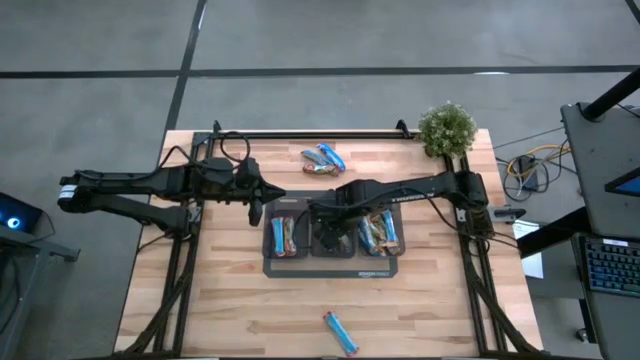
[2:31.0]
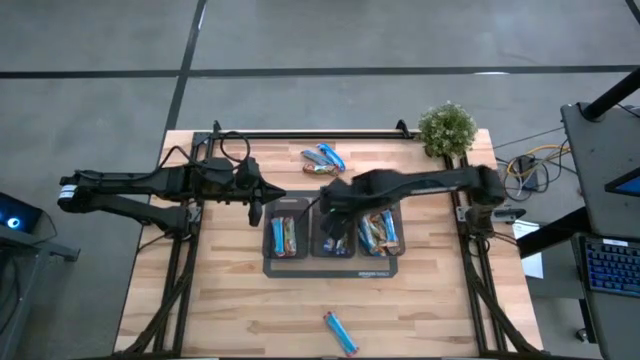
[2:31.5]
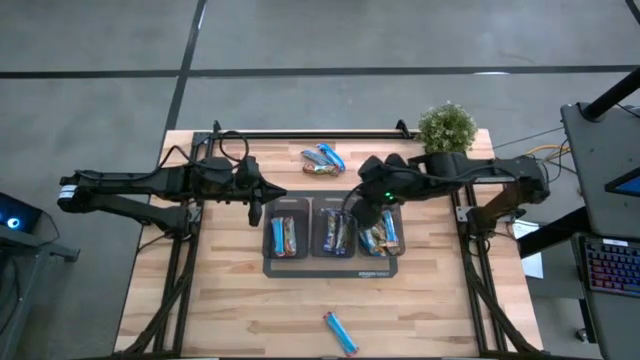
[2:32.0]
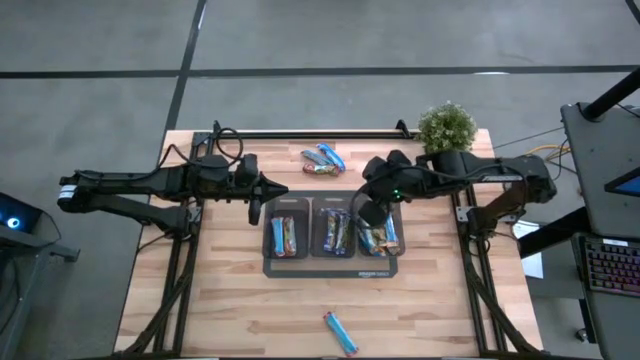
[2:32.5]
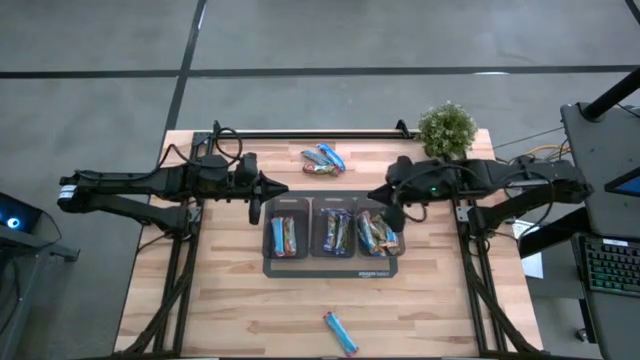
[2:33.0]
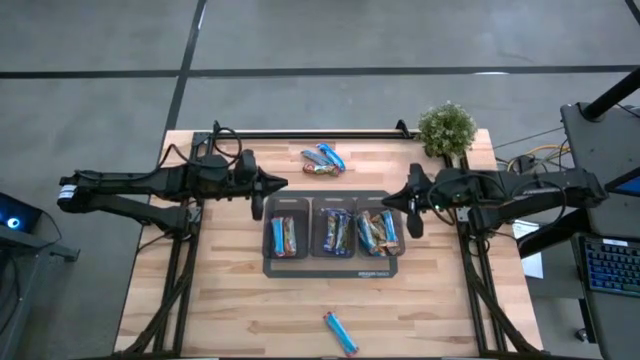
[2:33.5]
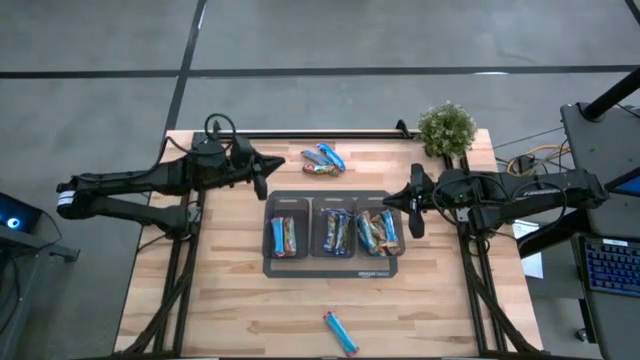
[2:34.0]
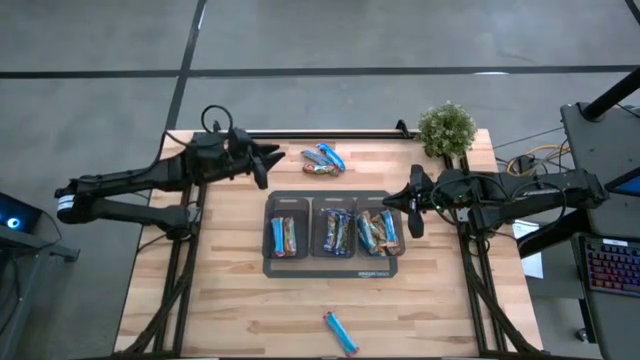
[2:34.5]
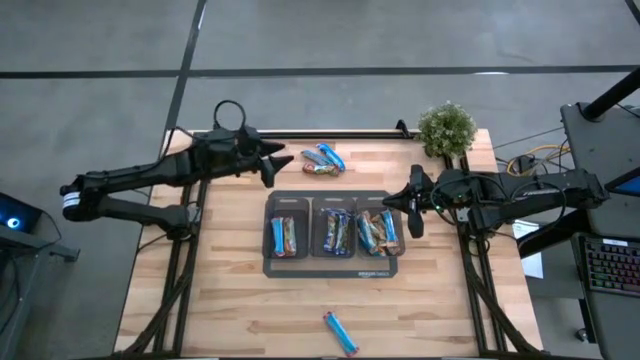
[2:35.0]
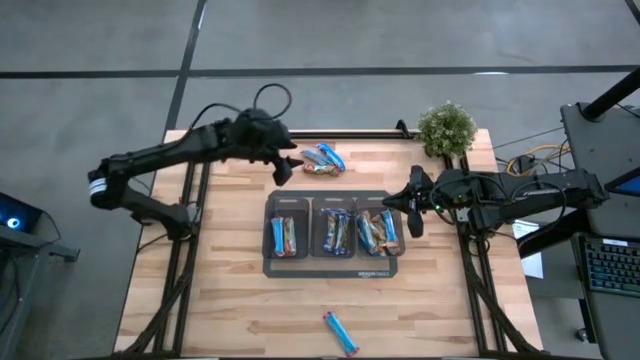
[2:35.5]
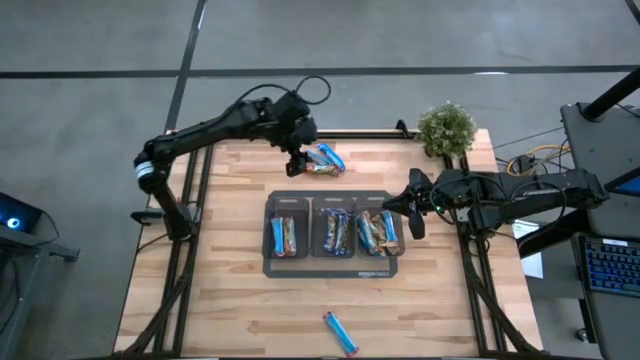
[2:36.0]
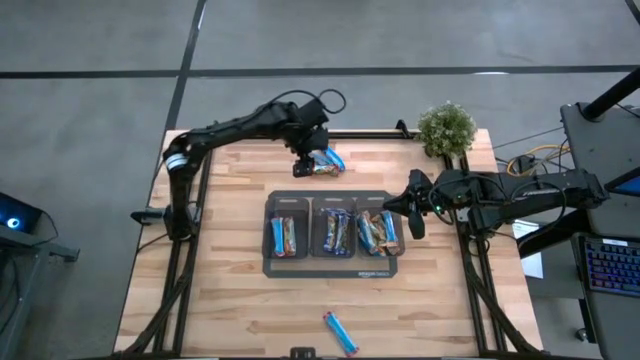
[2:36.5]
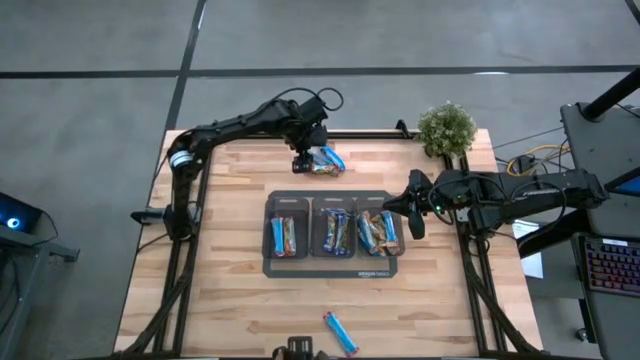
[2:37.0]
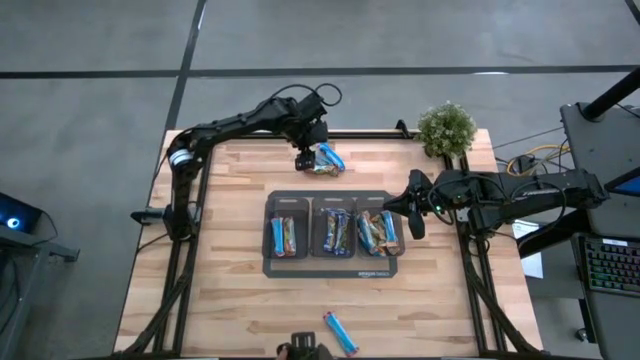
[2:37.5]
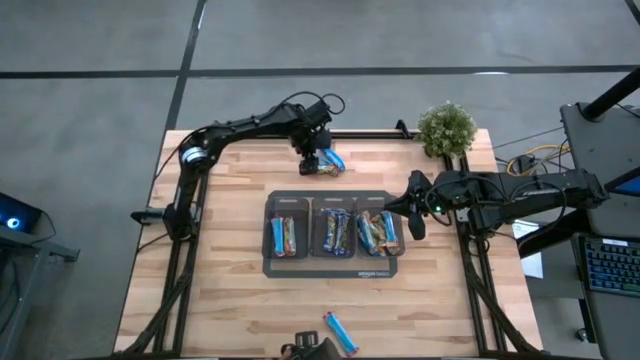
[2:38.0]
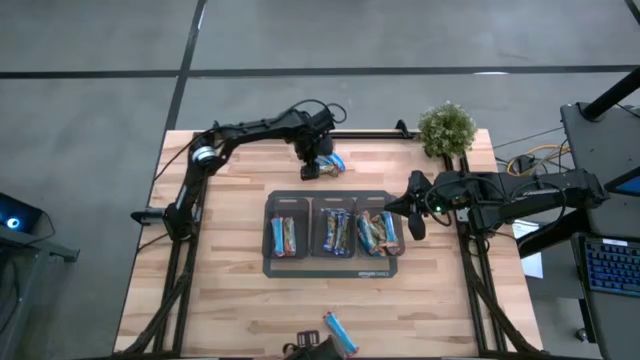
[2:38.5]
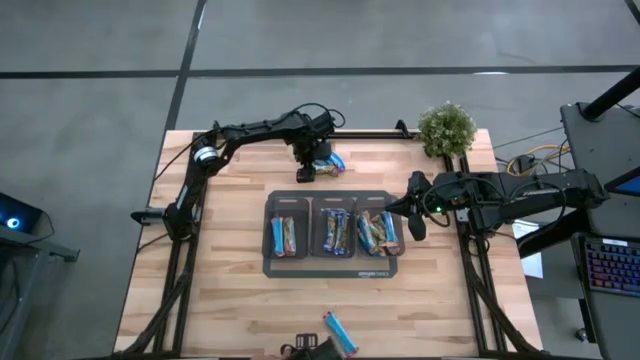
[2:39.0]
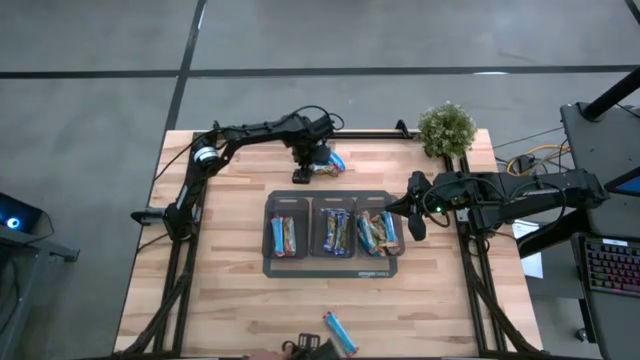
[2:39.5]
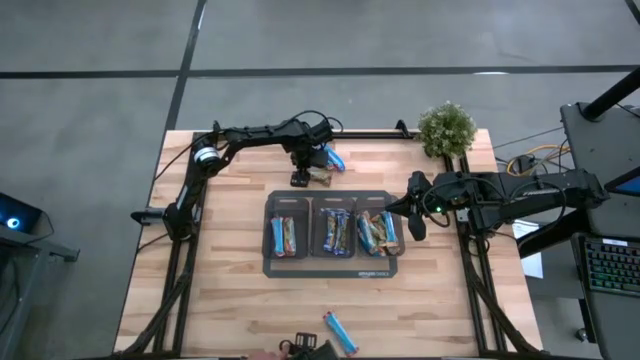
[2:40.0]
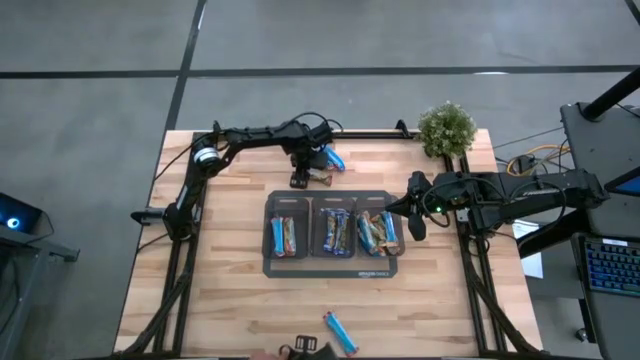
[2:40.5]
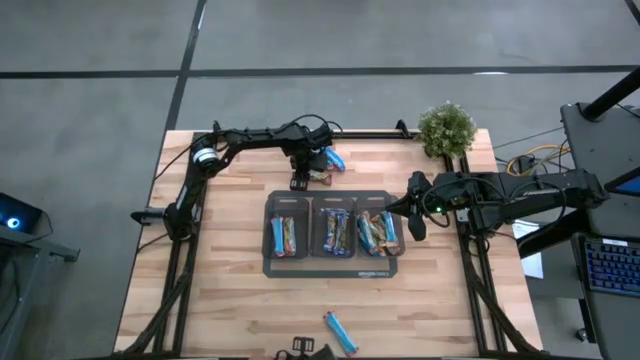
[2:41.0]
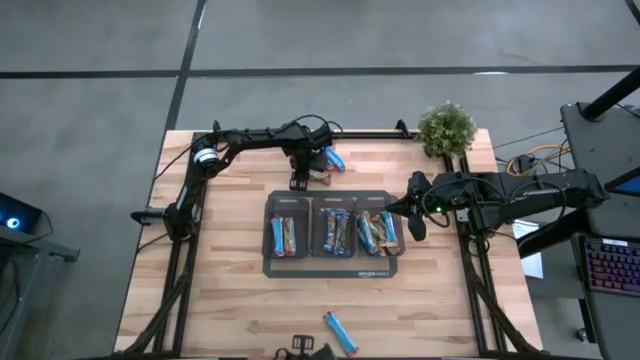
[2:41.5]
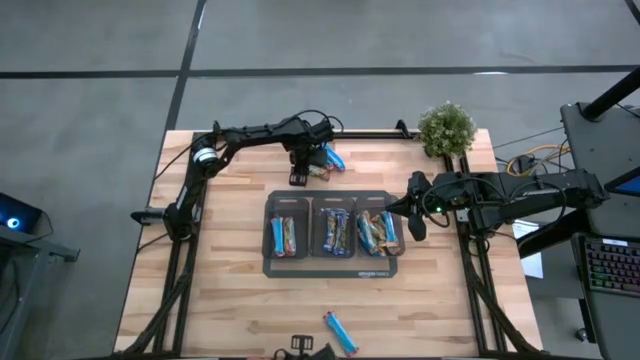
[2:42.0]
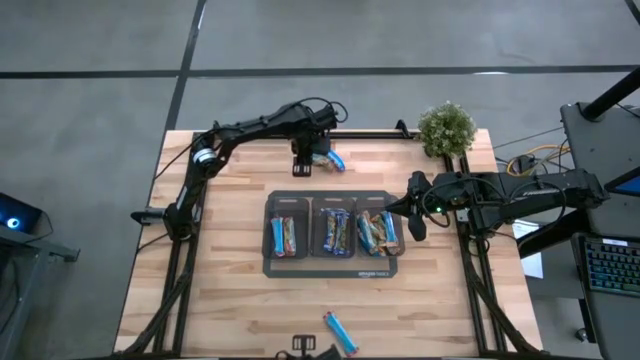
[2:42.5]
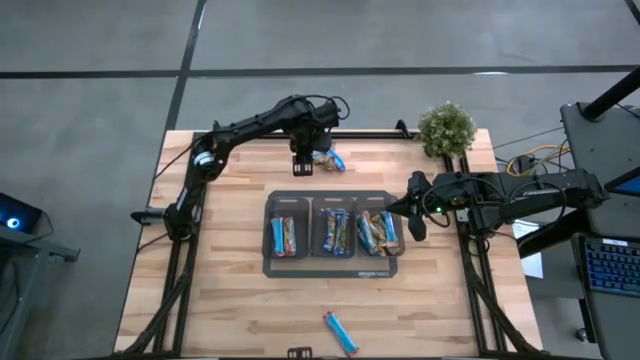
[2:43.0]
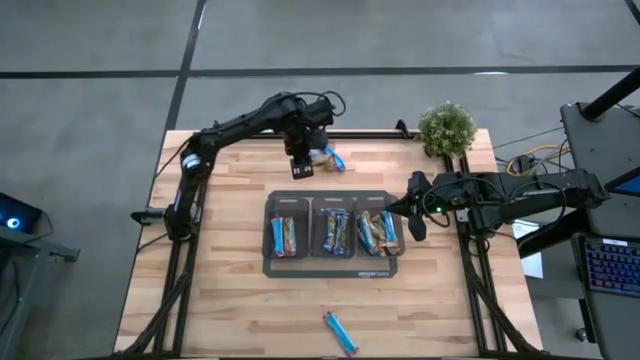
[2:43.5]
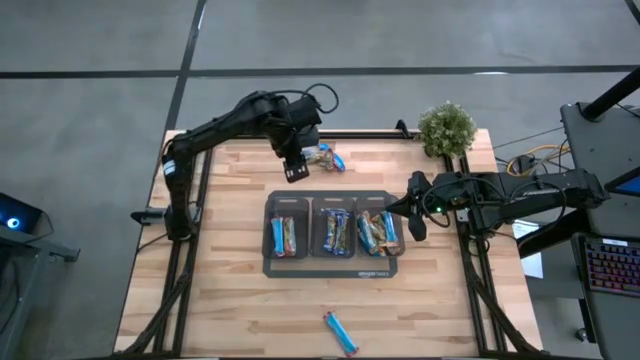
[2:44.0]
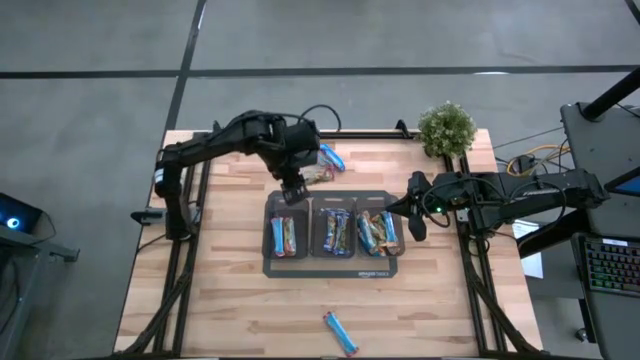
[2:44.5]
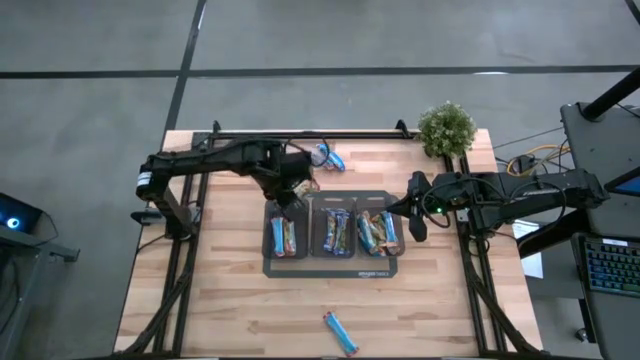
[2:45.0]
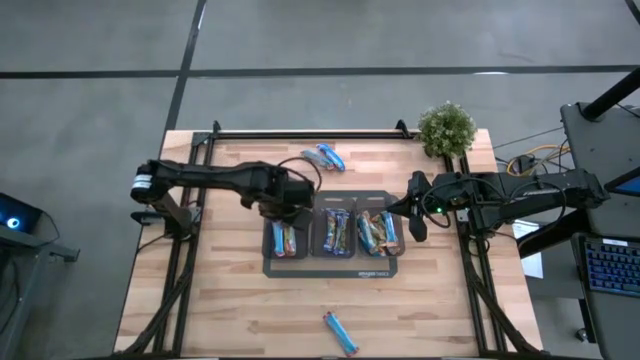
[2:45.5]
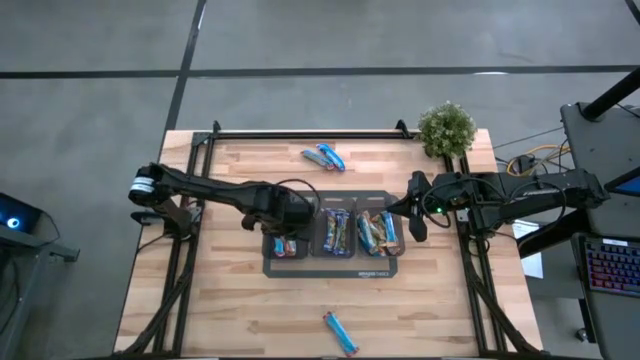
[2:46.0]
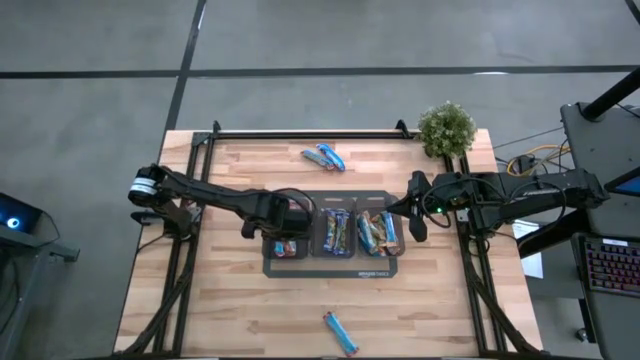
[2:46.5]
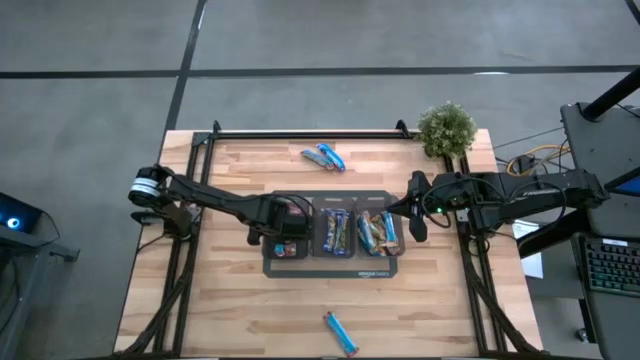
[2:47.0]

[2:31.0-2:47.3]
Task: Pick and place Granola Bars by type
Put the red granola bar into the left black bin

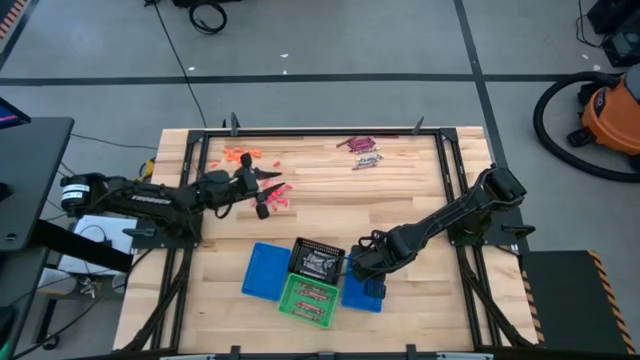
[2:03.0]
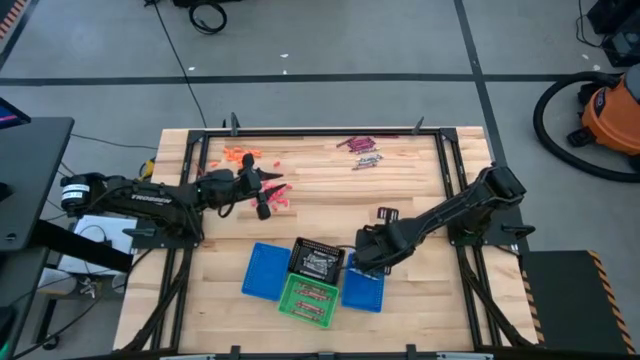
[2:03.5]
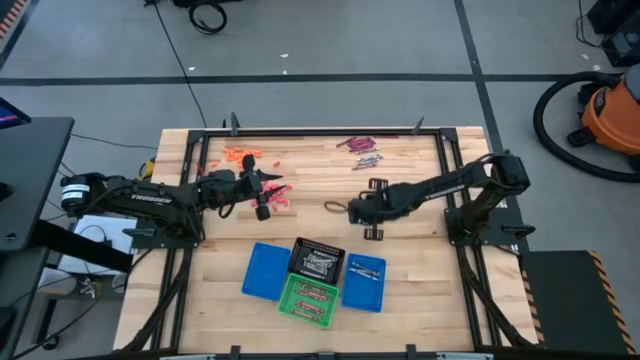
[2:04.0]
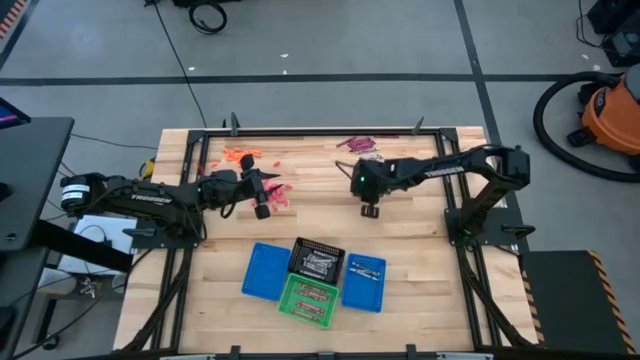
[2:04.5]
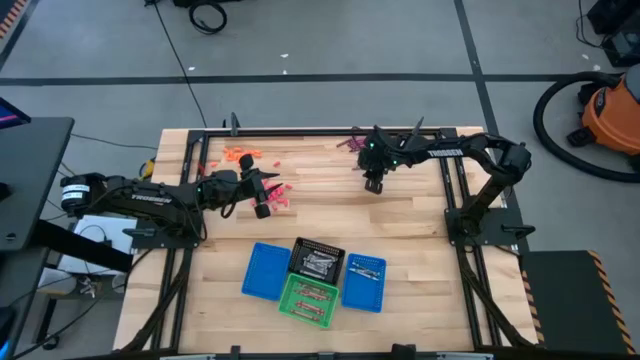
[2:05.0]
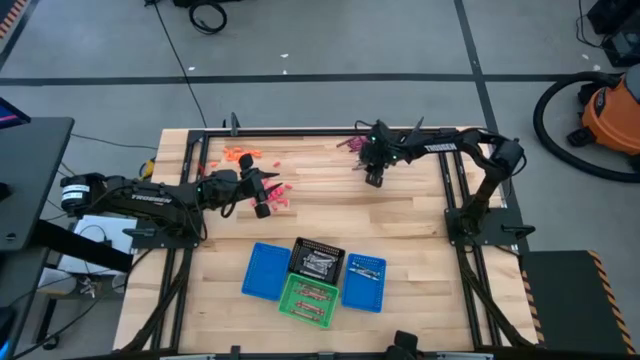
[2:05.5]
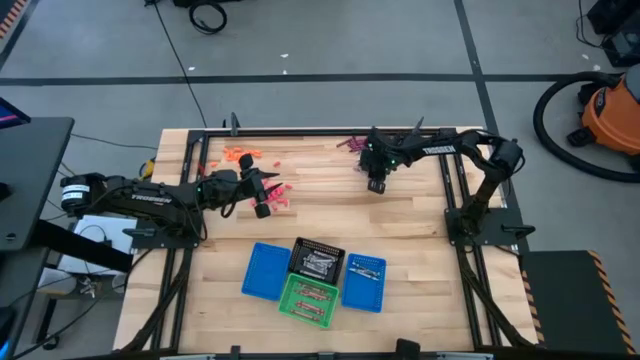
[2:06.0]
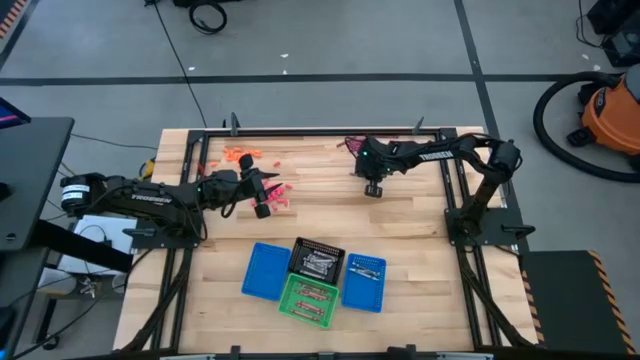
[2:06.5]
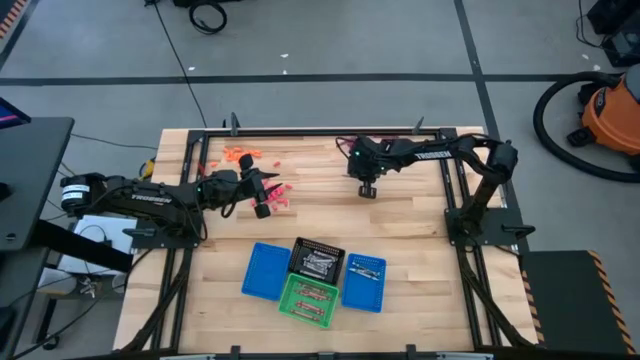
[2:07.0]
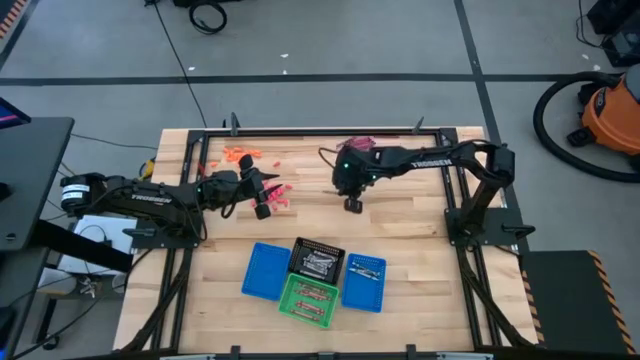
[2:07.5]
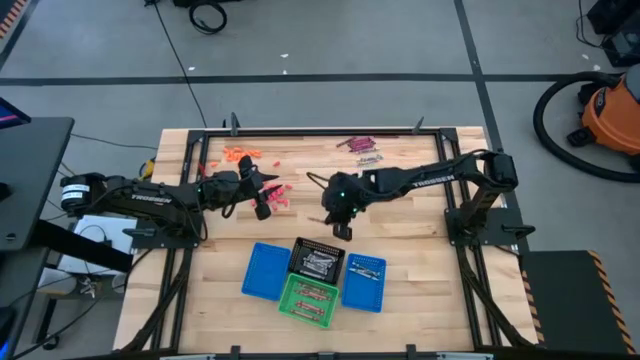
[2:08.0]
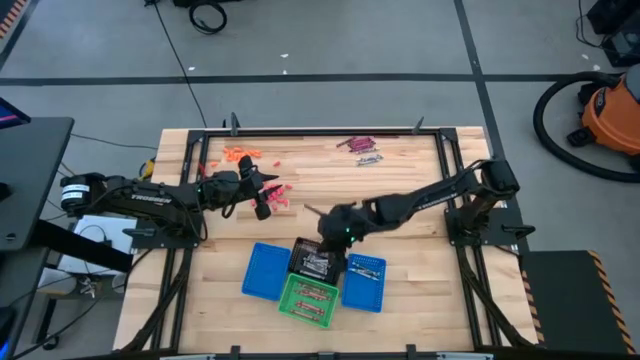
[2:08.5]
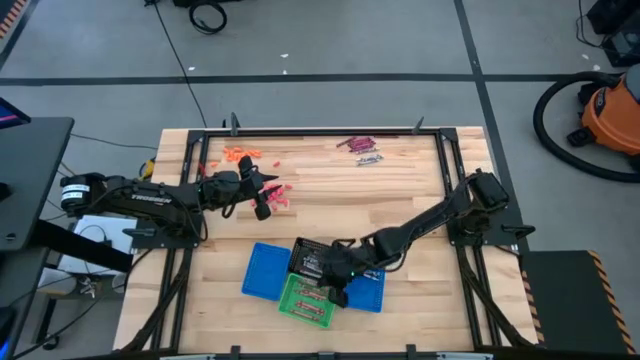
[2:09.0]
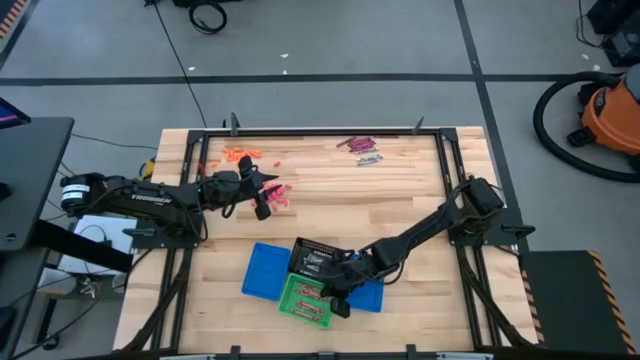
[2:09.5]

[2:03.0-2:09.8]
Task: Sort crayons
Put the pink crayon into the green bin
